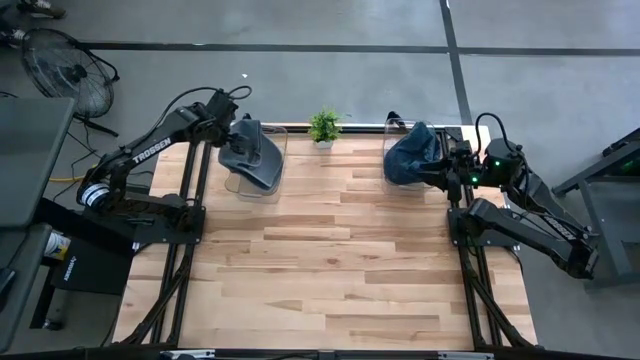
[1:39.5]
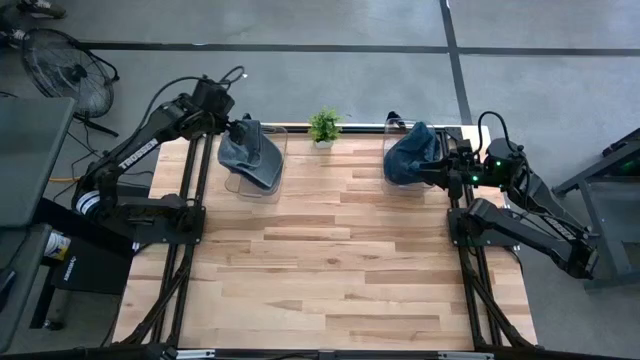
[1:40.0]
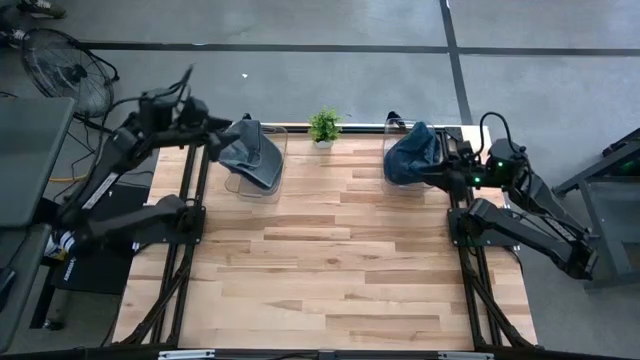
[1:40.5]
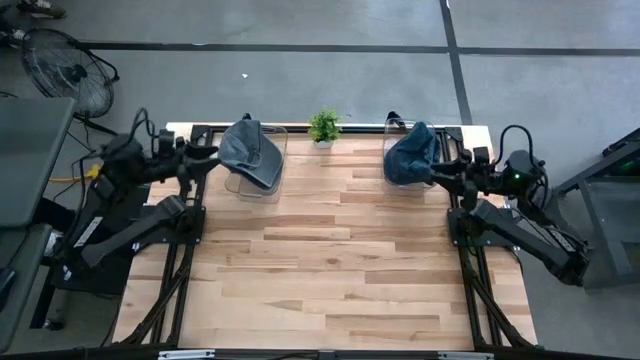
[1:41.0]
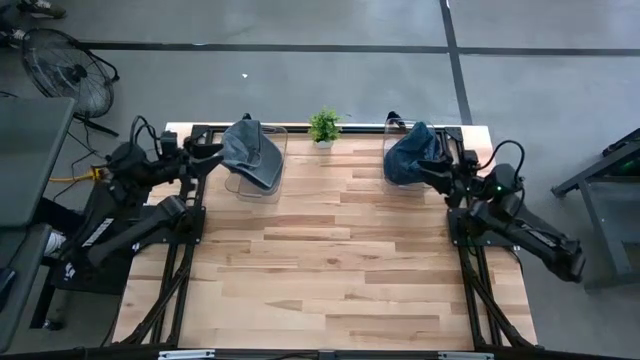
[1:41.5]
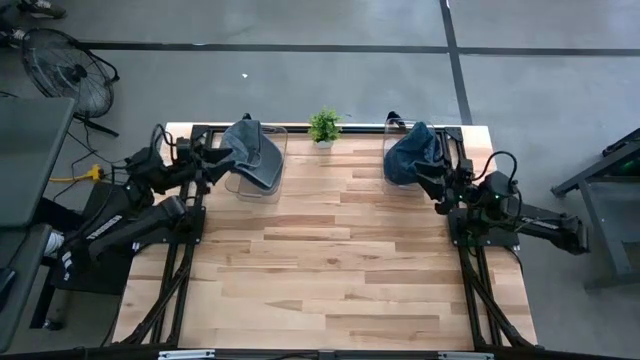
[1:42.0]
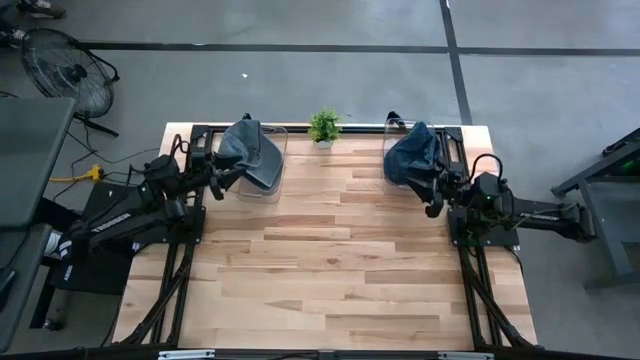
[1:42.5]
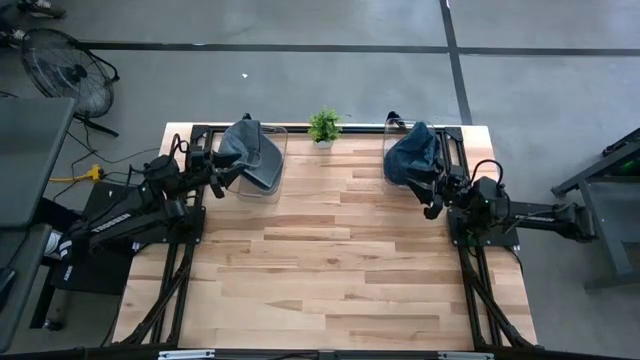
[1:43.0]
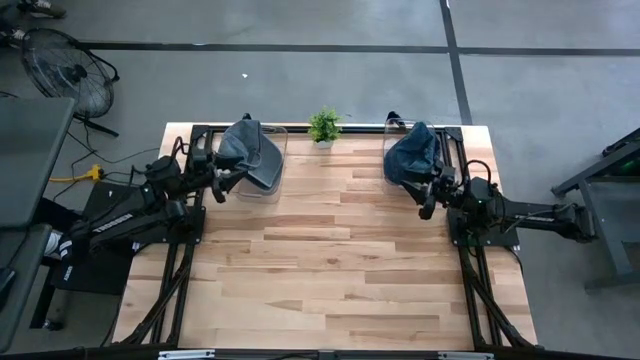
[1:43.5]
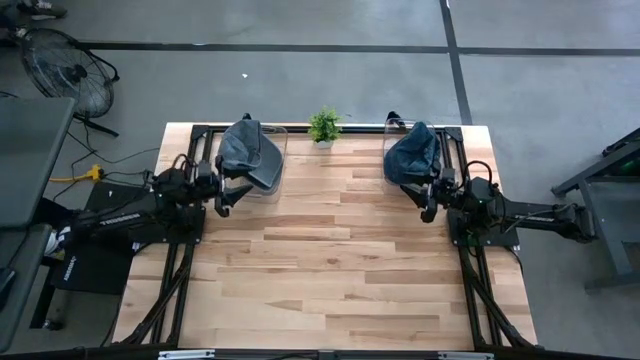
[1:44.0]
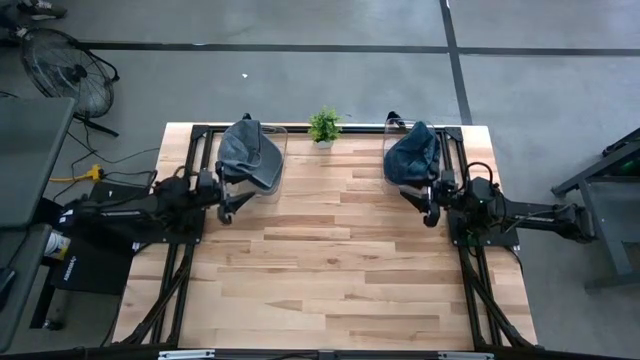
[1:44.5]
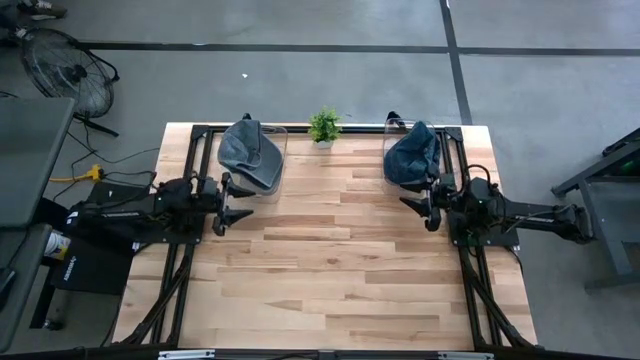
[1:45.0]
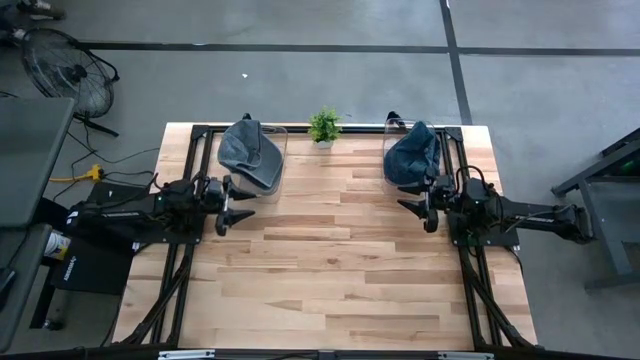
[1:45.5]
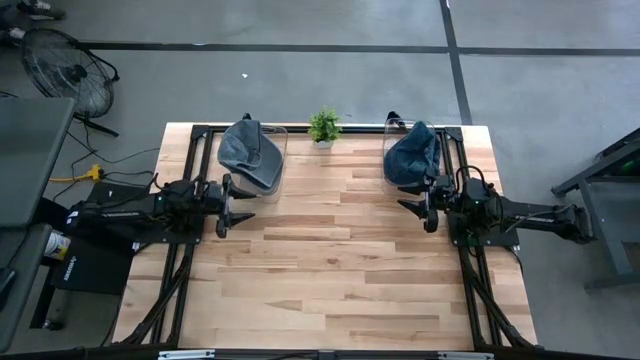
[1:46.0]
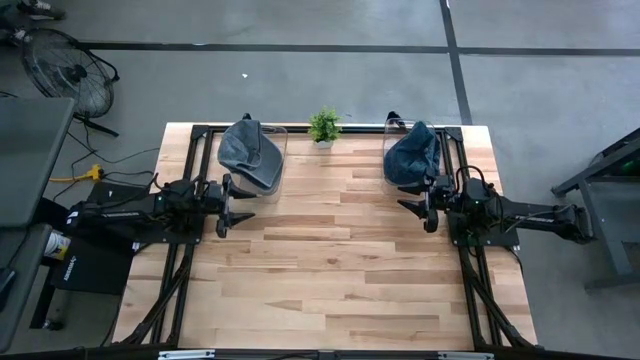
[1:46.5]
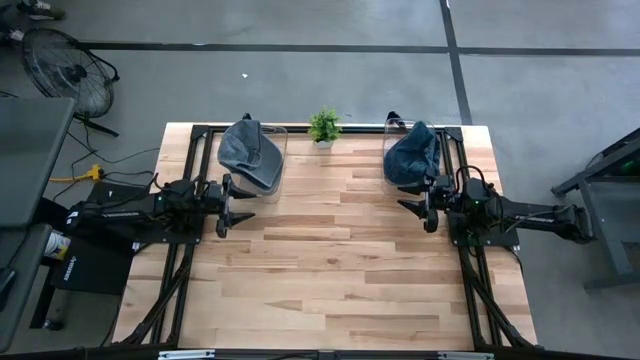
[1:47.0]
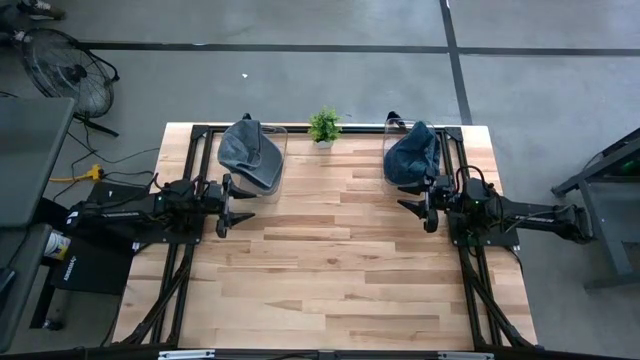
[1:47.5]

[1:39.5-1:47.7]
Task: Pick & Place hat
Return to Home Position

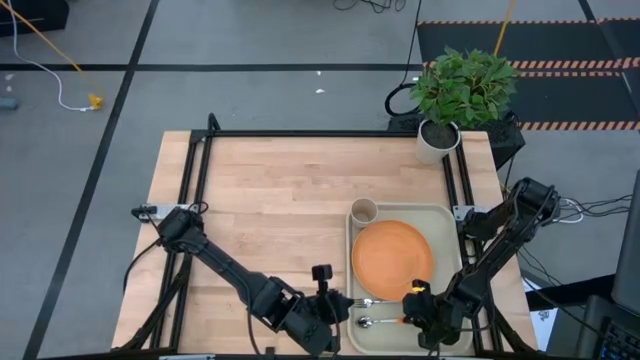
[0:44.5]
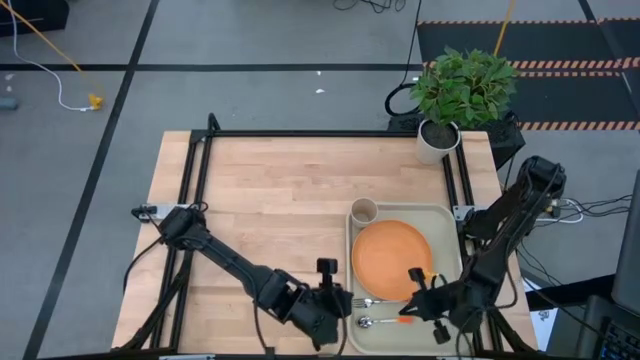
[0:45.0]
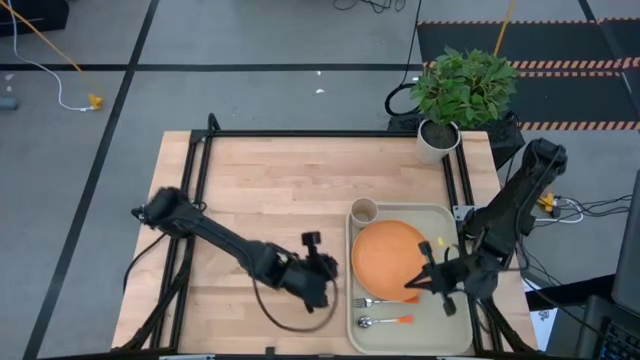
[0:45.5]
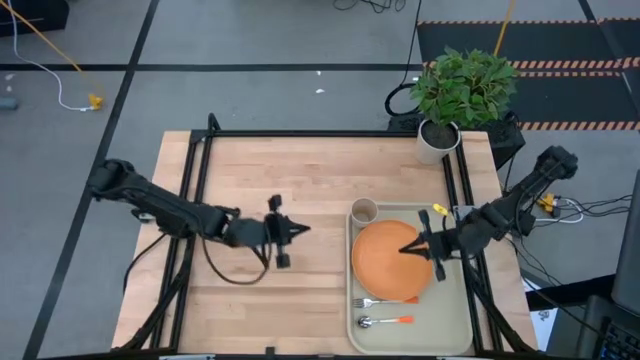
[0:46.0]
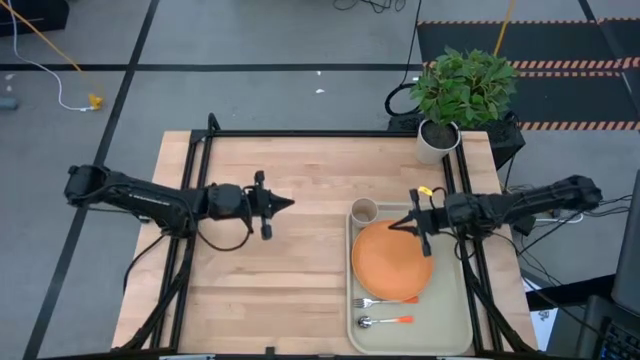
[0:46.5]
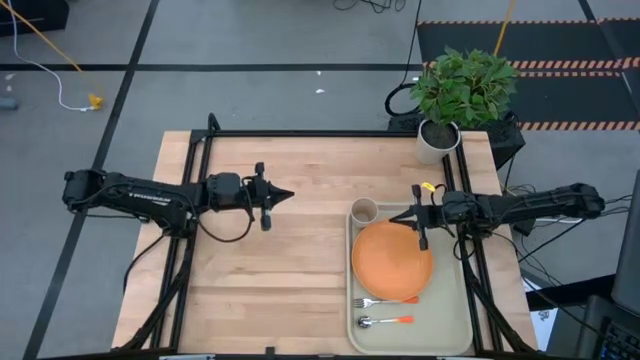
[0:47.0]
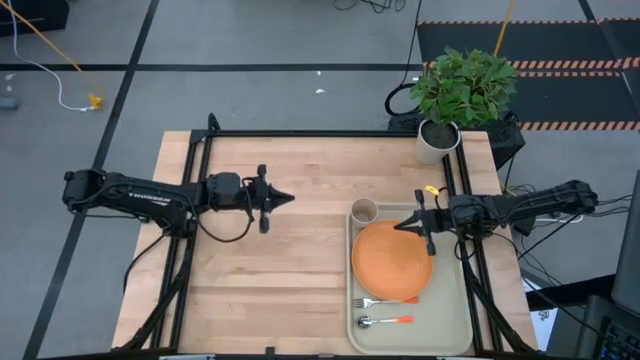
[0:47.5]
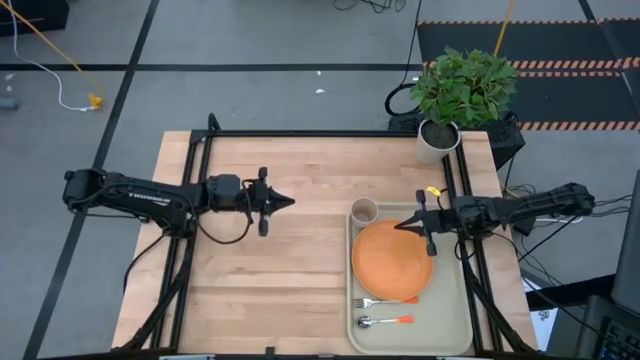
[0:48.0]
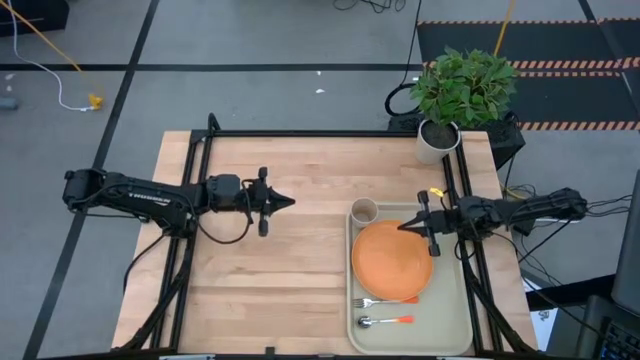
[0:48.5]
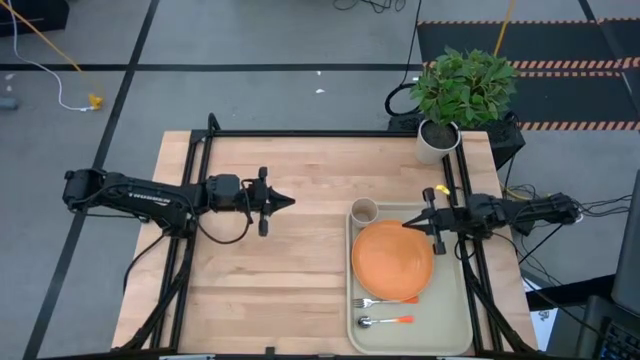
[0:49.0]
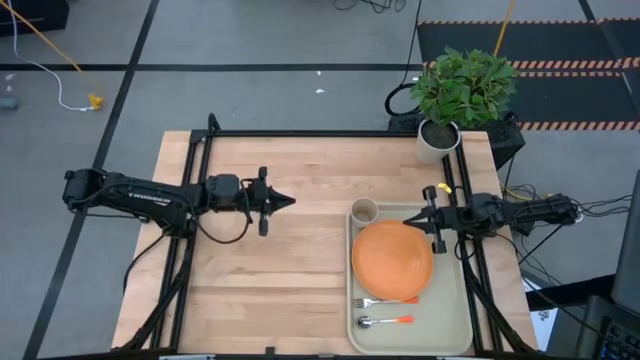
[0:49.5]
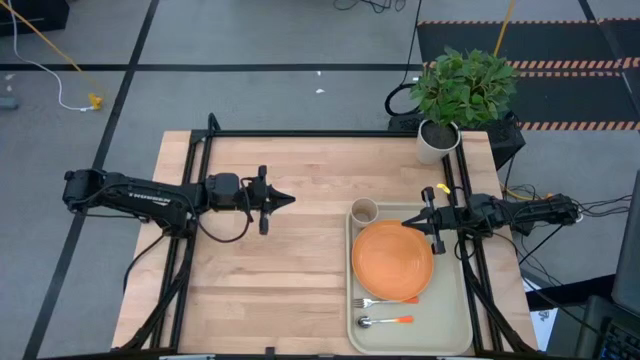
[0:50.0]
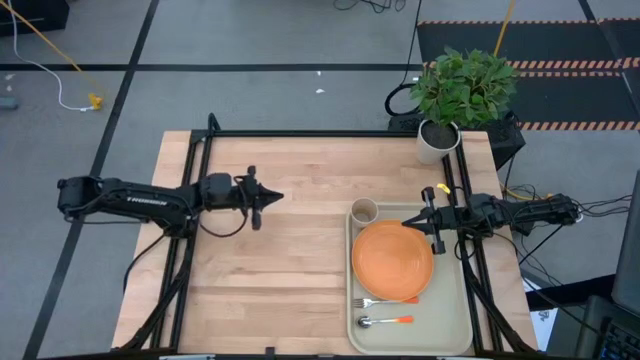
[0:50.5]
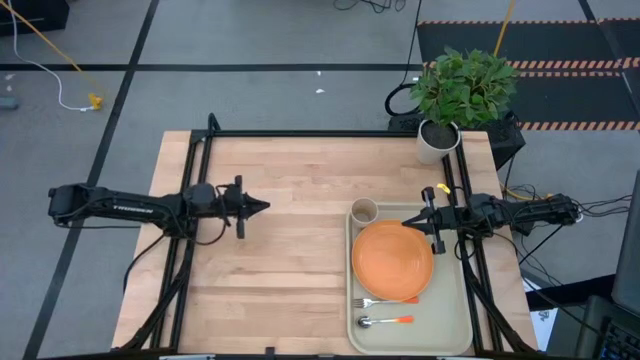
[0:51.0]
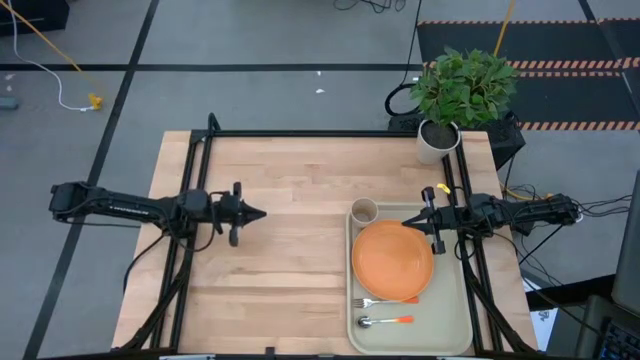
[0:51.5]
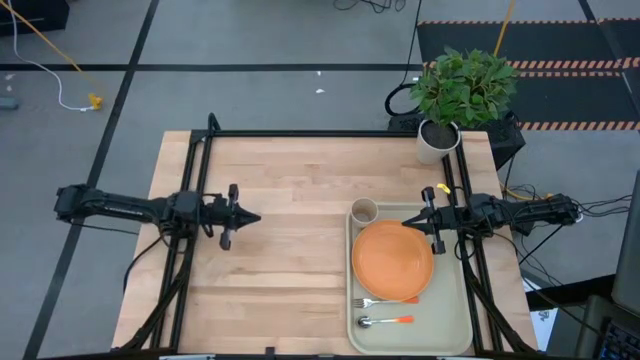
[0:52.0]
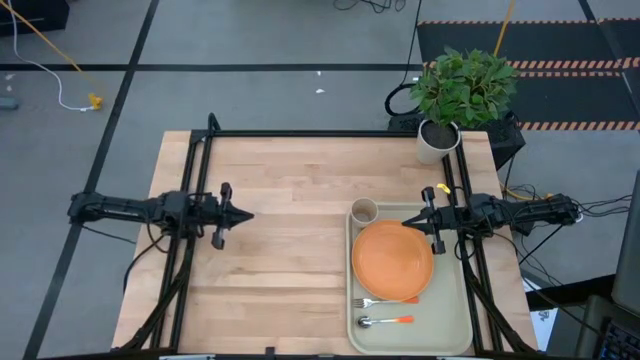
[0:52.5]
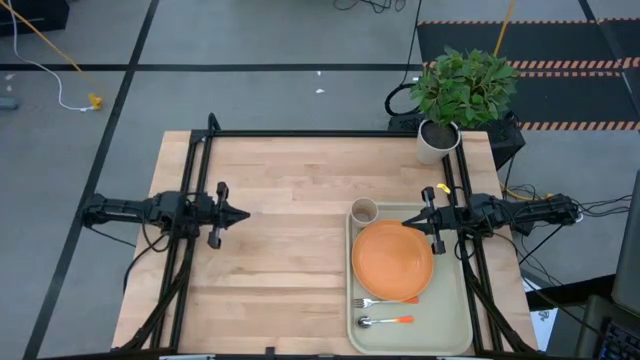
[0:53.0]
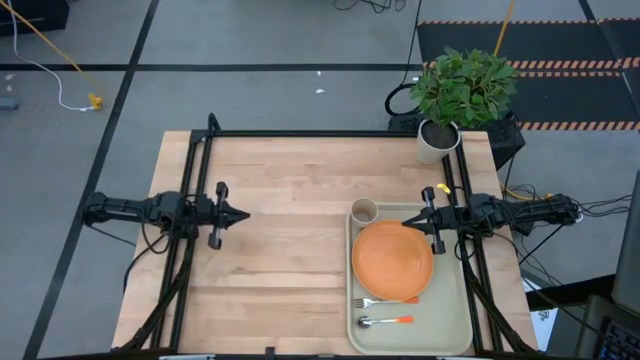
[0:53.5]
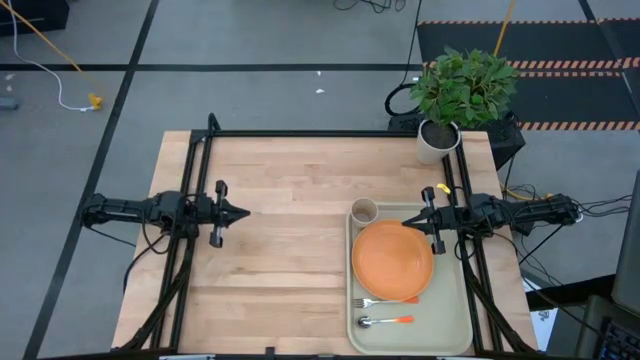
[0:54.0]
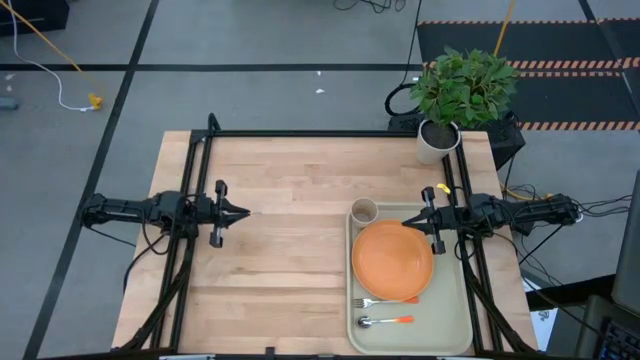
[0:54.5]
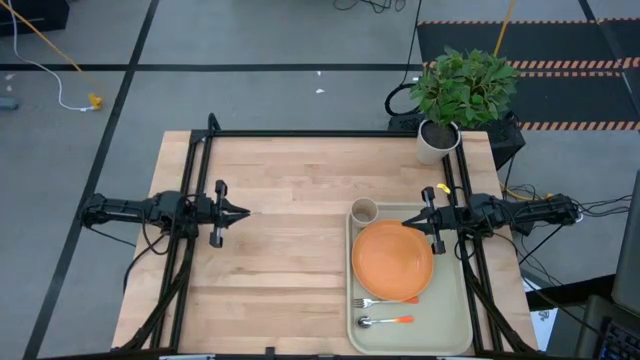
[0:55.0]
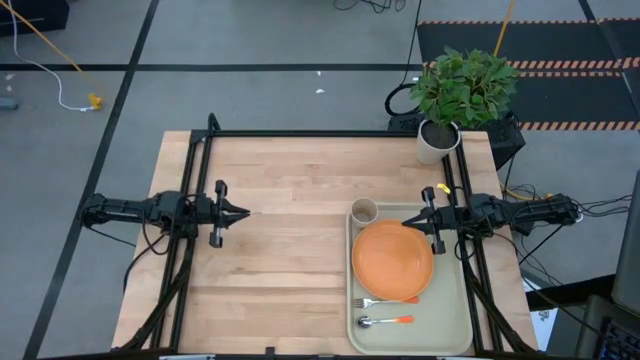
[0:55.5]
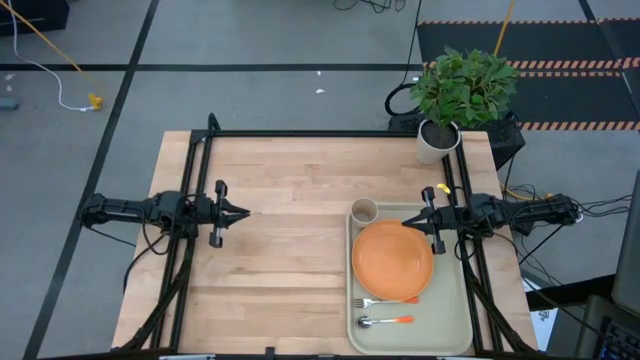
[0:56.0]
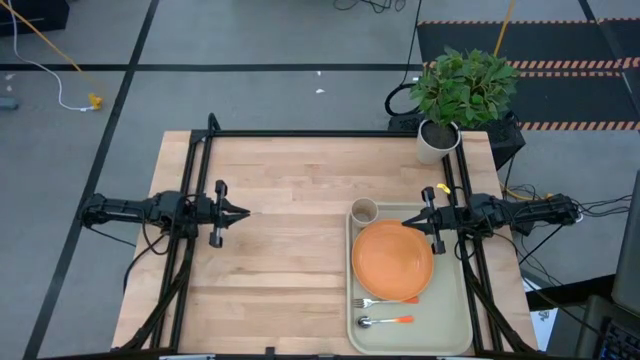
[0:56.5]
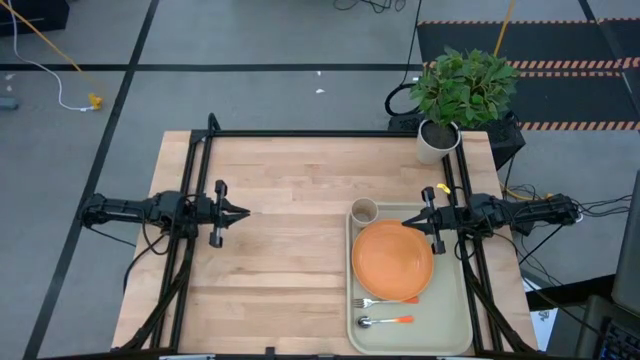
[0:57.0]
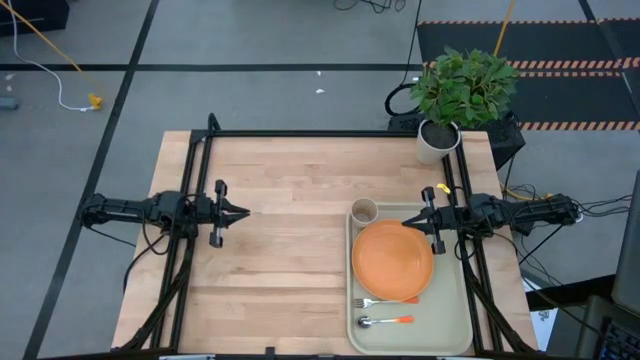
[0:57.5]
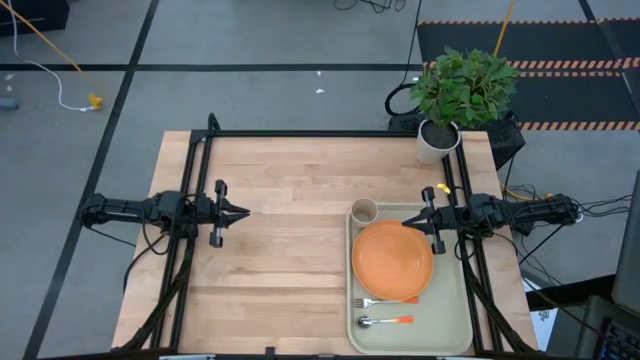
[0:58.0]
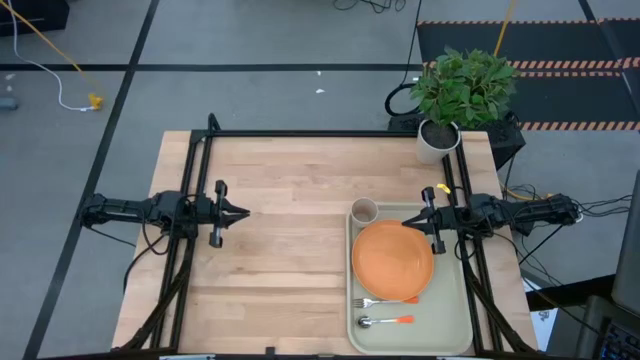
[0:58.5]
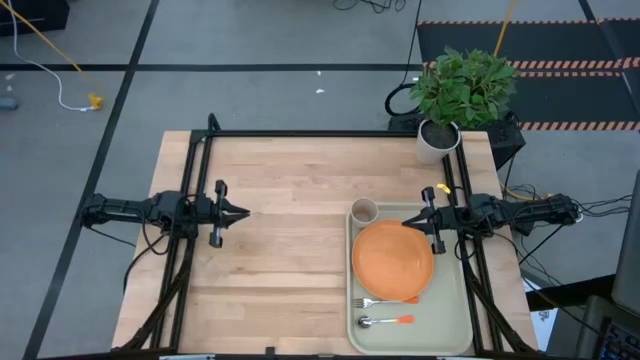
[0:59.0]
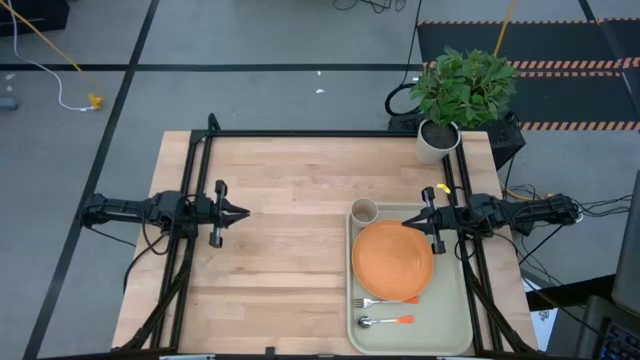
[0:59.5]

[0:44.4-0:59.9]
Task: Pick and place plate/cup/fork/spoon on tray
Return to Home Position
